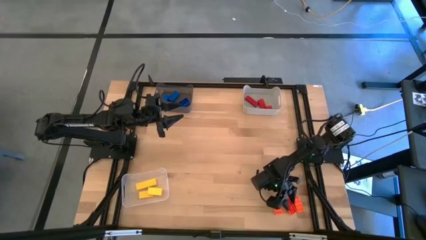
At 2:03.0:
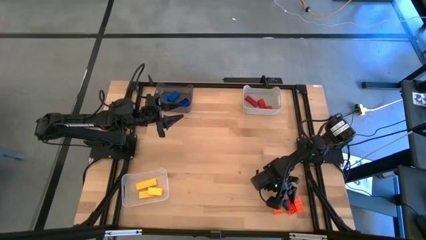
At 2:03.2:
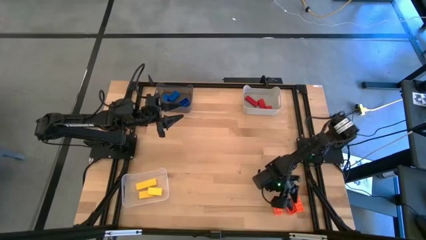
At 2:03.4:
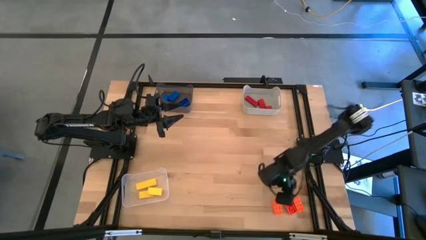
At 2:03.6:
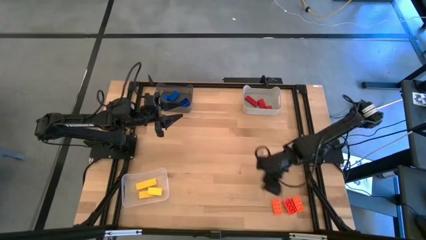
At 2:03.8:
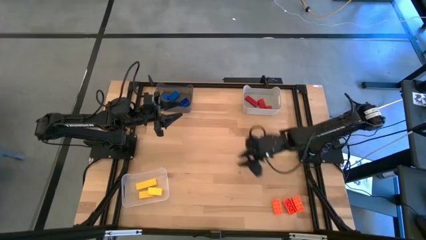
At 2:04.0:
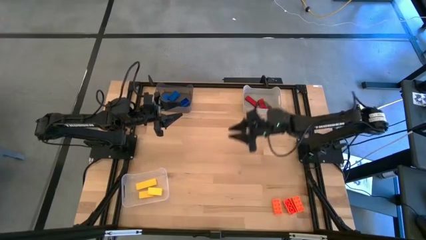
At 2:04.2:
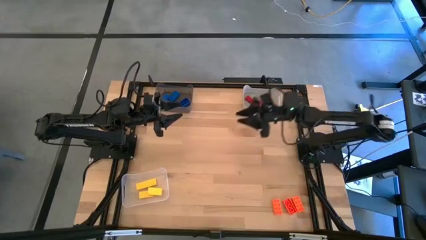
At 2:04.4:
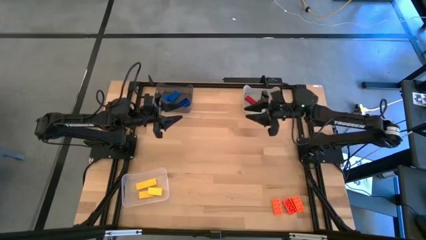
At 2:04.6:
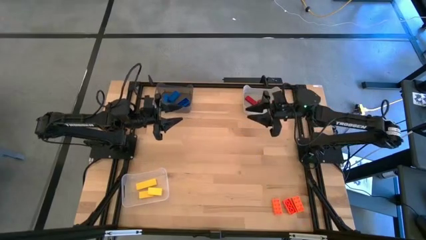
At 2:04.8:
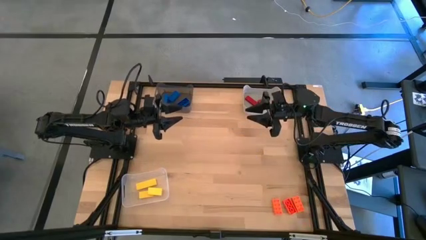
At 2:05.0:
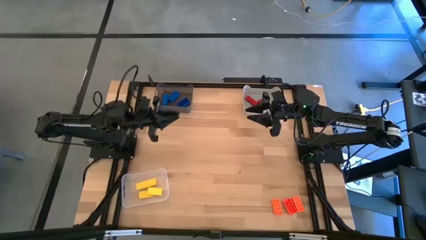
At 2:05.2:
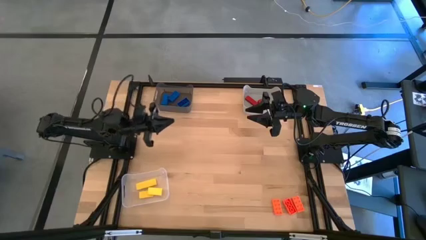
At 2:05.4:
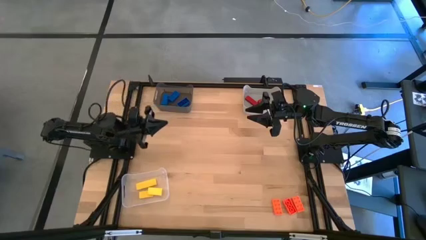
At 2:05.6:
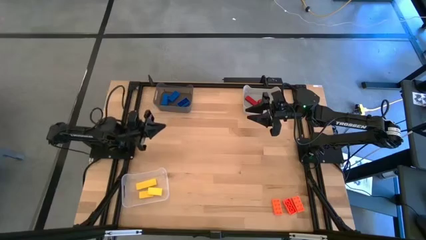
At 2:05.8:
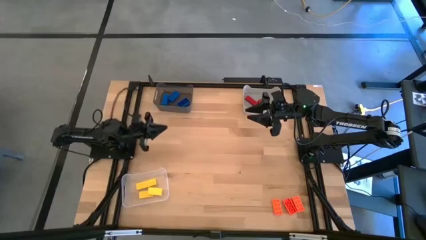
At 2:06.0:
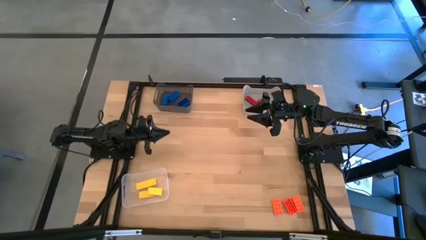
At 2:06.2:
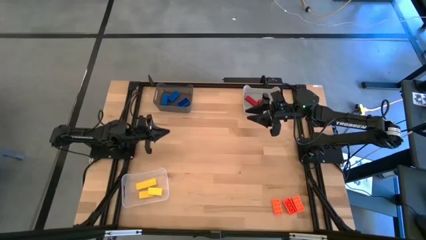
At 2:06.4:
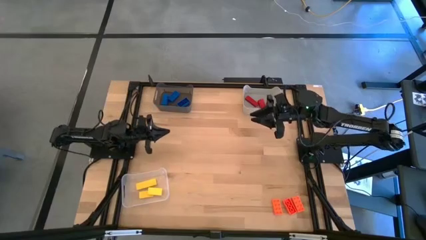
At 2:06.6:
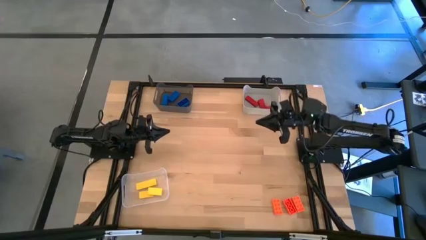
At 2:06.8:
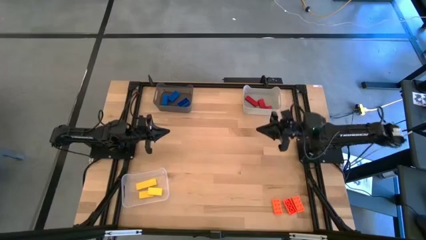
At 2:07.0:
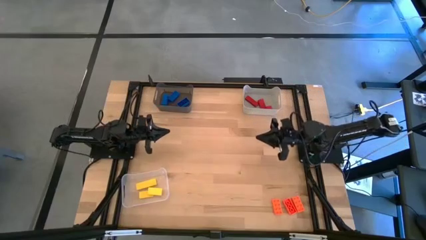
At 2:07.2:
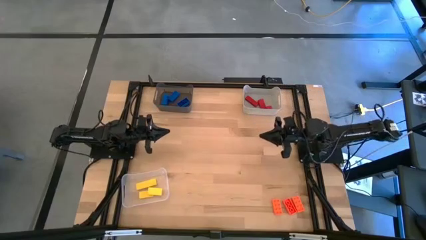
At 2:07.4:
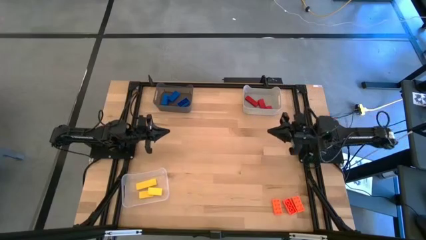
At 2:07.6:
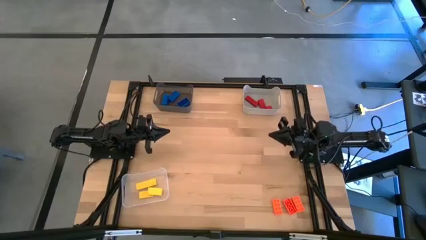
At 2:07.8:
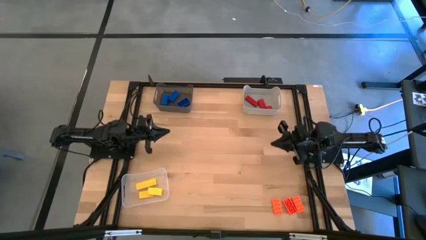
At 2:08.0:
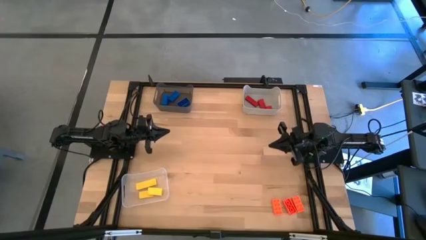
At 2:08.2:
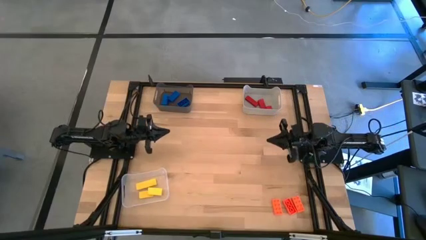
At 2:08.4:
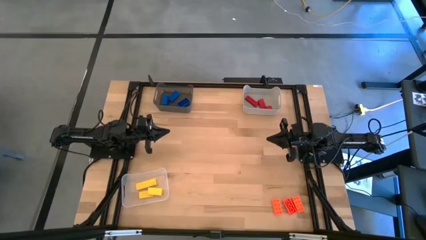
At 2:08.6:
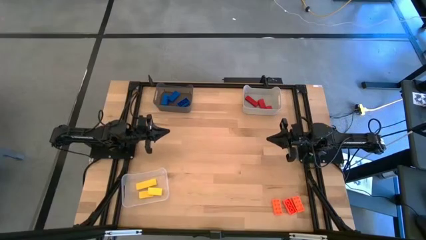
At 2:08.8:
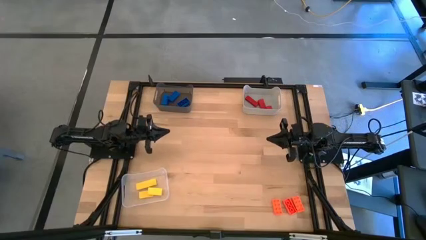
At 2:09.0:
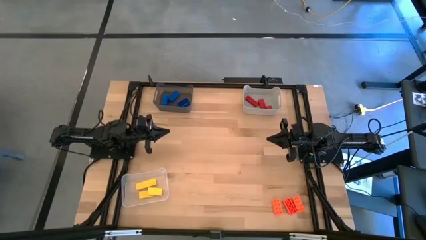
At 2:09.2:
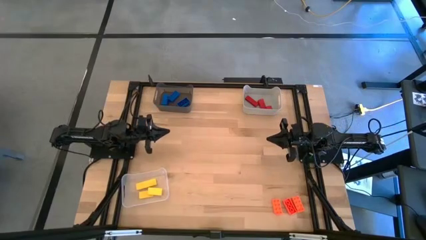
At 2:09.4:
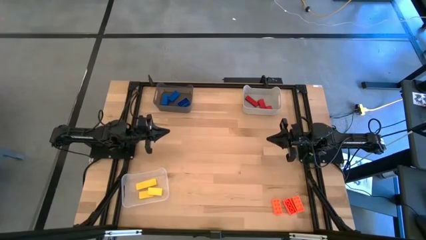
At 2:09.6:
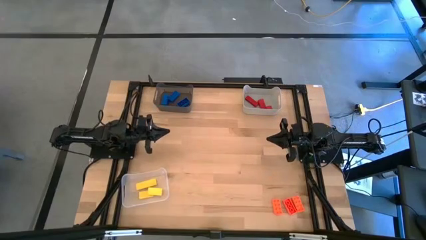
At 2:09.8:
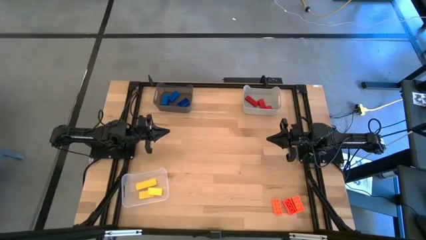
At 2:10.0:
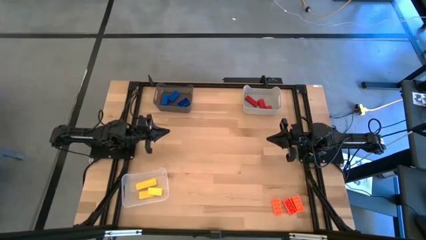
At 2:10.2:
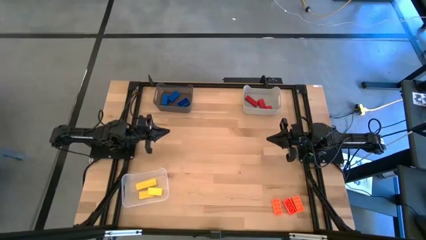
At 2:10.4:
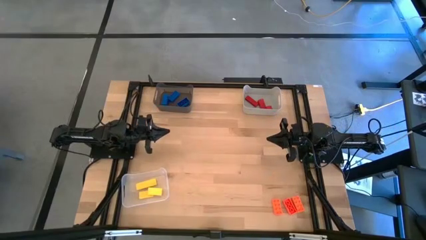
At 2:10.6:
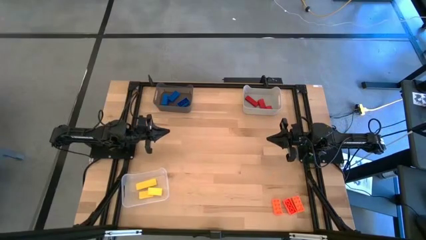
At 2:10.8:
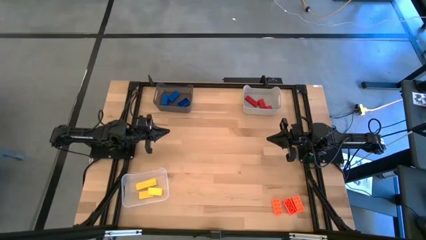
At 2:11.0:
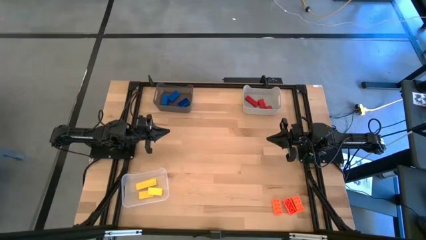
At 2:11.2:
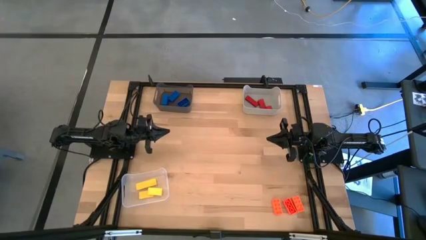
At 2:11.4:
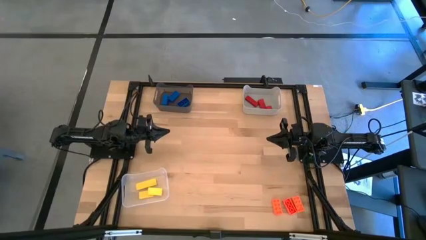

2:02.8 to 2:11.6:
Task: Sort & place blocks by color
Return to Home Position

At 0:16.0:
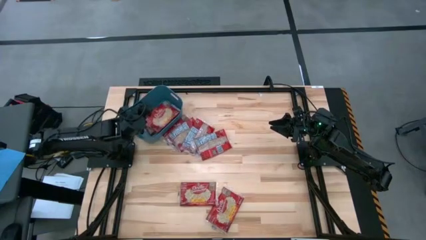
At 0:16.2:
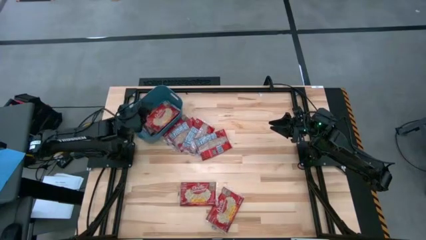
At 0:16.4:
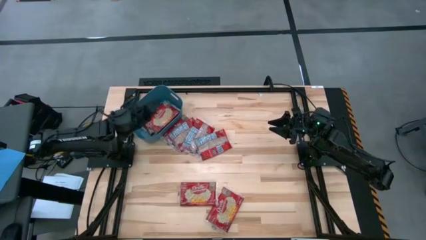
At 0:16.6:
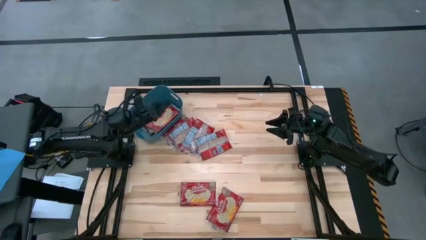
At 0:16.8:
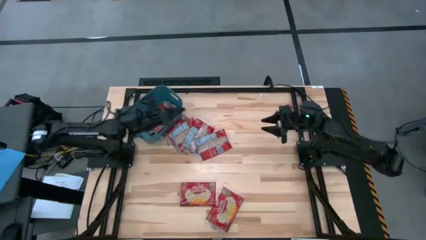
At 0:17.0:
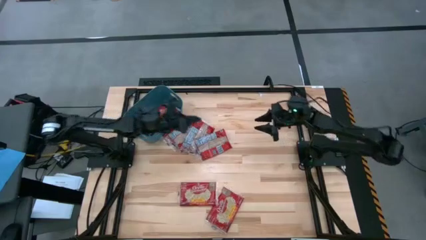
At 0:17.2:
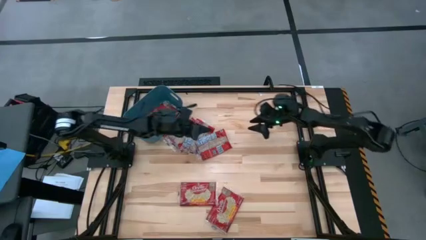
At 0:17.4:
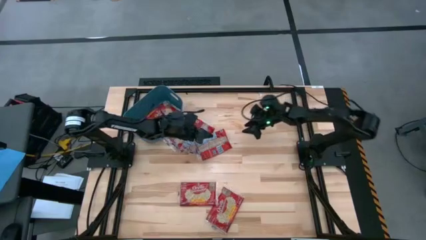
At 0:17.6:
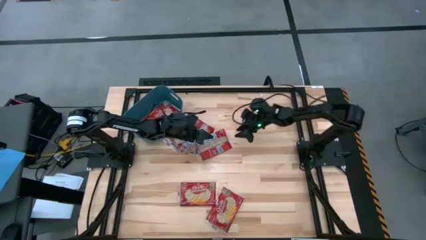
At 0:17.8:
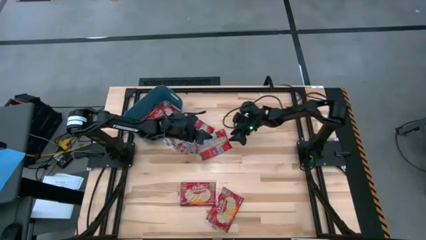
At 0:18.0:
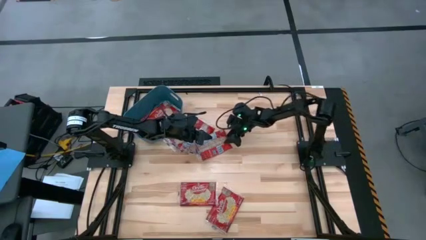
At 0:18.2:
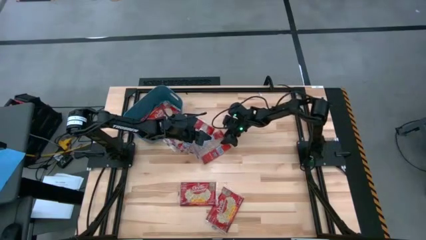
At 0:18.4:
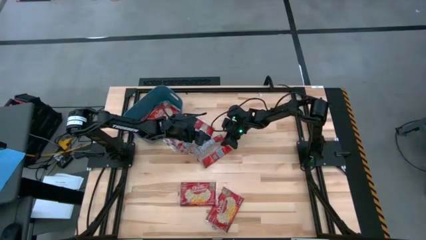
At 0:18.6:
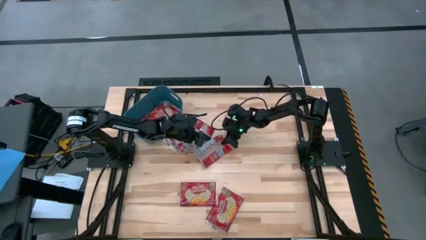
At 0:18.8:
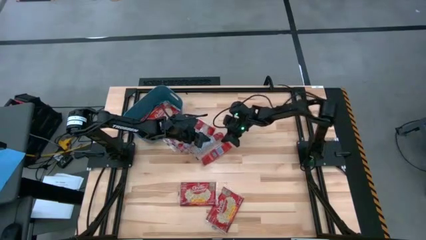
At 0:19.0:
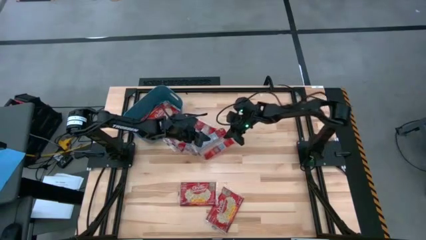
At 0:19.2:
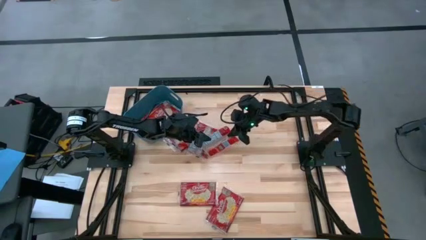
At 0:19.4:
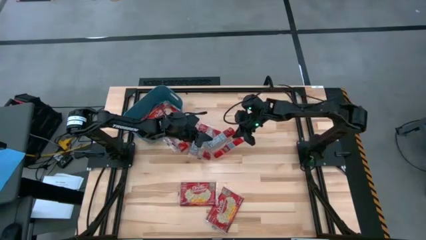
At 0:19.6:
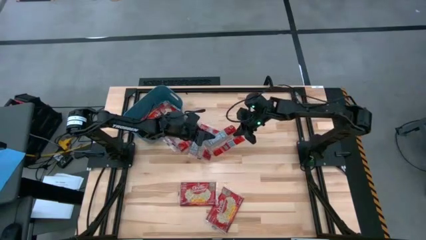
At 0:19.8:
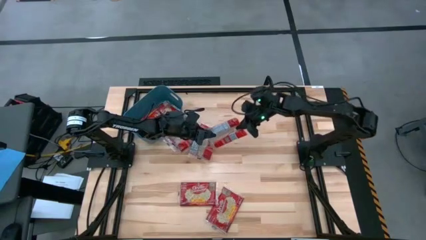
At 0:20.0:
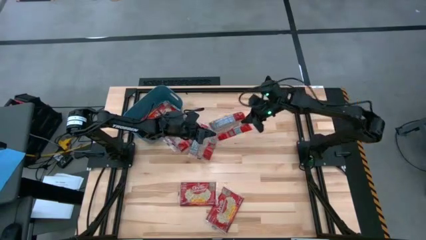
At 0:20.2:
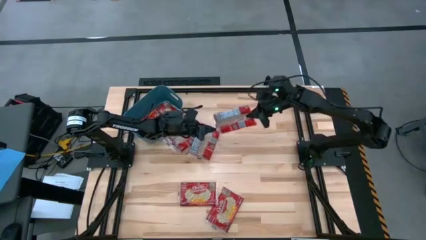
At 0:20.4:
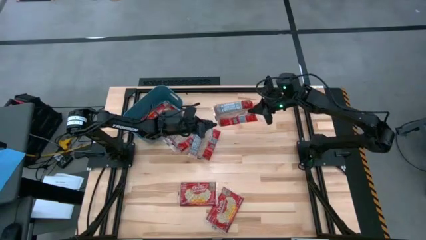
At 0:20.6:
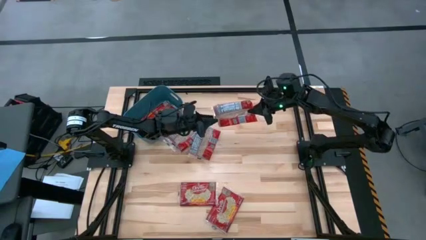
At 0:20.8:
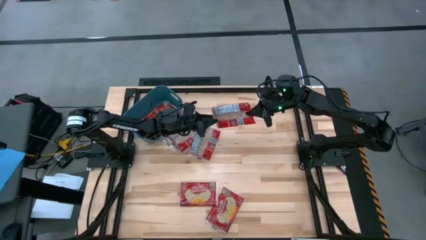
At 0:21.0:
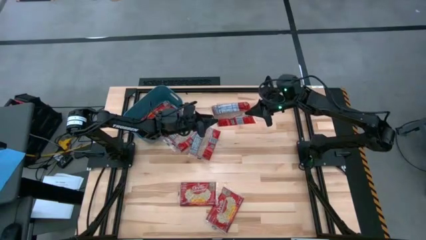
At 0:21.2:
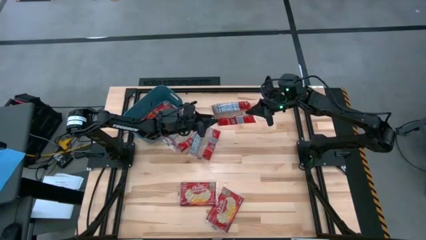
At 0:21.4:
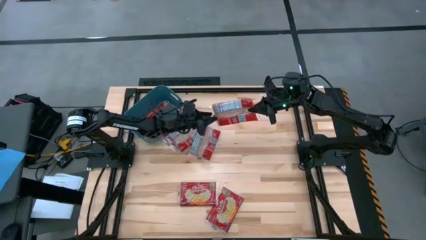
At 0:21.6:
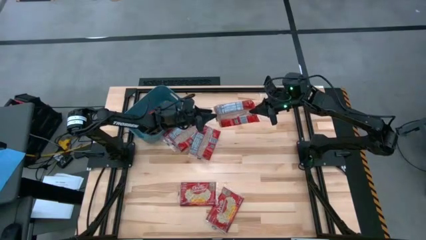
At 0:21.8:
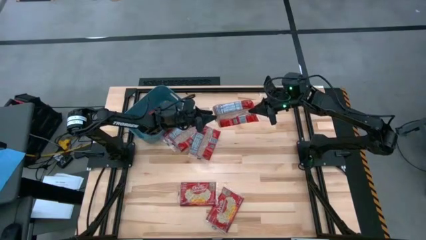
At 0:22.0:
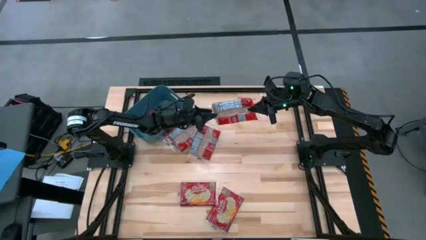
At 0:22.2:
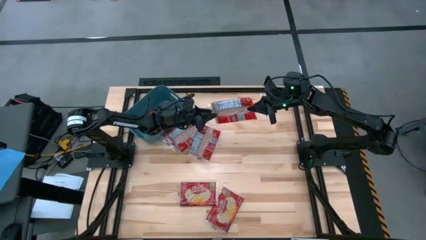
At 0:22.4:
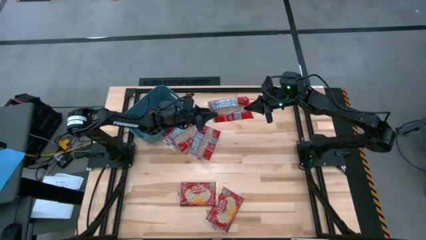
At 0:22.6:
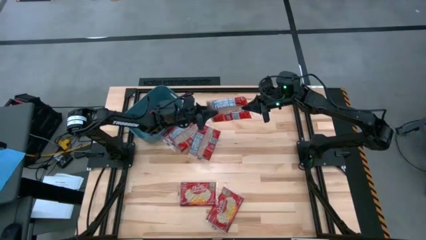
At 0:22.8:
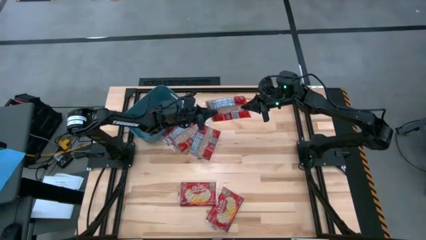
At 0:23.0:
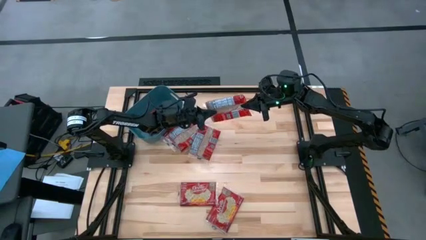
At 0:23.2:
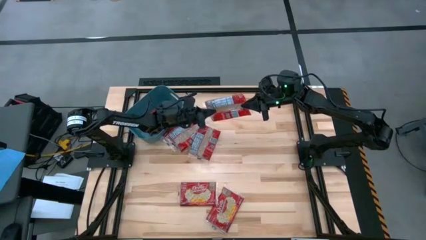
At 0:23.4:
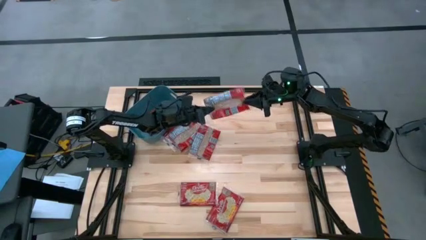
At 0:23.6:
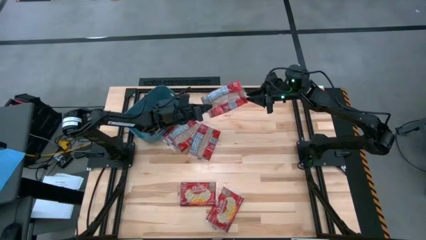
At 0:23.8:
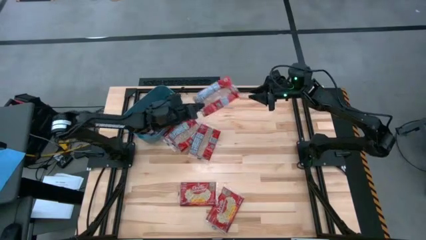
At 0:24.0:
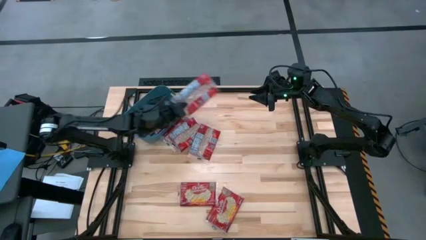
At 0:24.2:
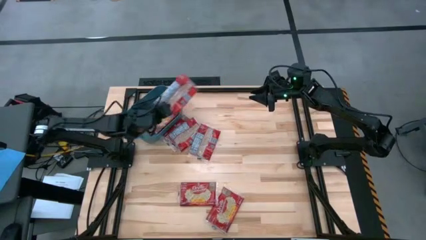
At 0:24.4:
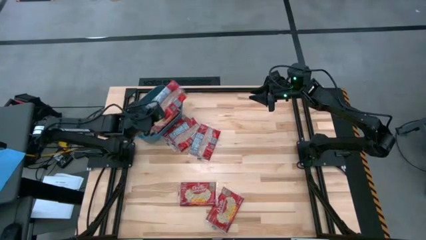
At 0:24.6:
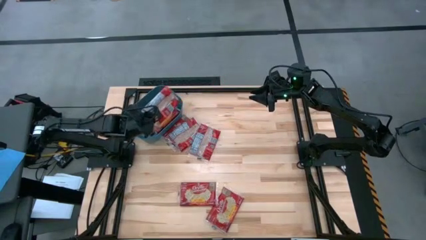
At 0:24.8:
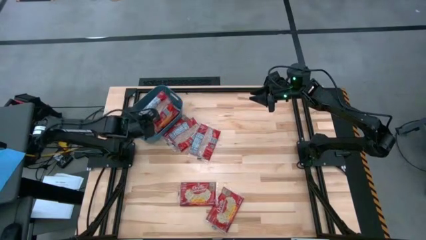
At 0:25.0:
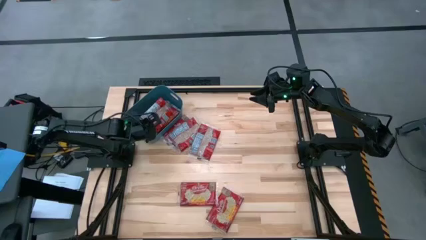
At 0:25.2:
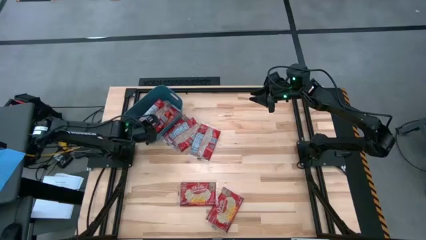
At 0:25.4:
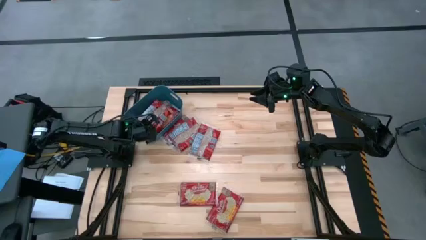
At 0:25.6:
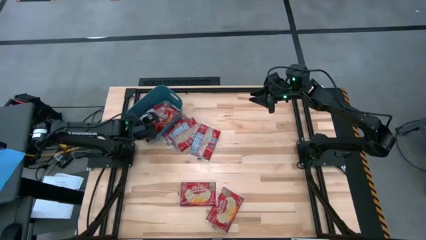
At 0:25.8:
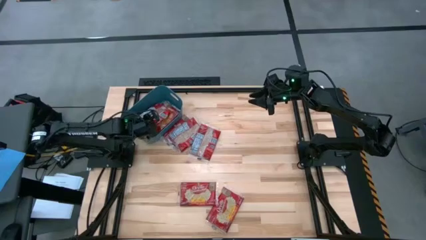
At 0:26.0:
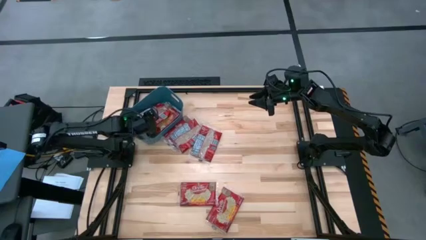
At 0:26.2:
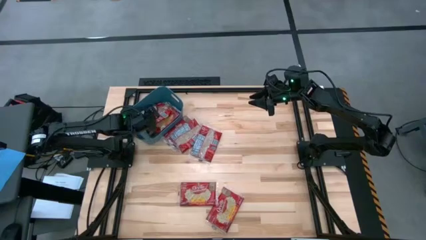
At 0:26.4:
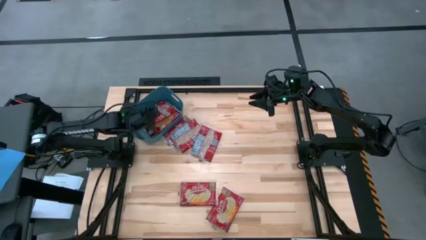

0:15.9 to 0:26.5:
Task: Sort popcorn bags into baskets
Put the popcorn bag into the green bin
